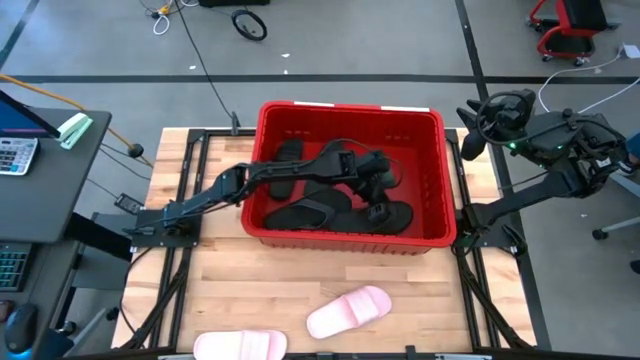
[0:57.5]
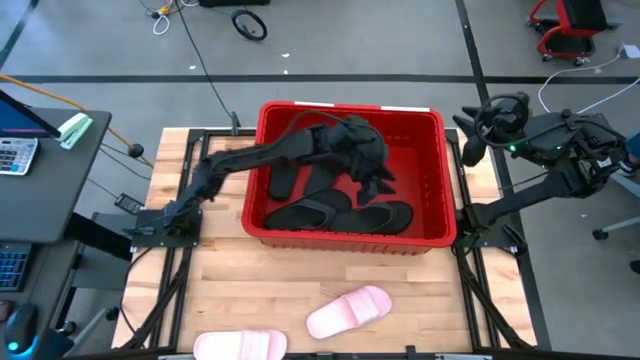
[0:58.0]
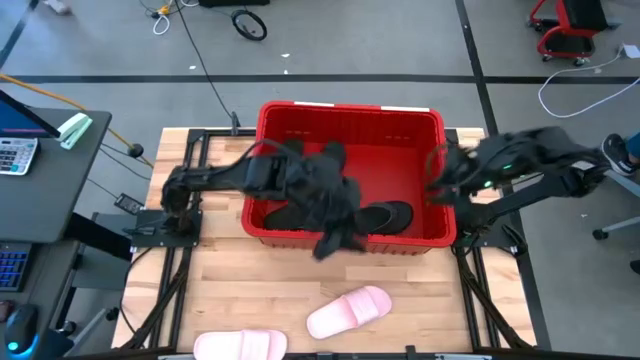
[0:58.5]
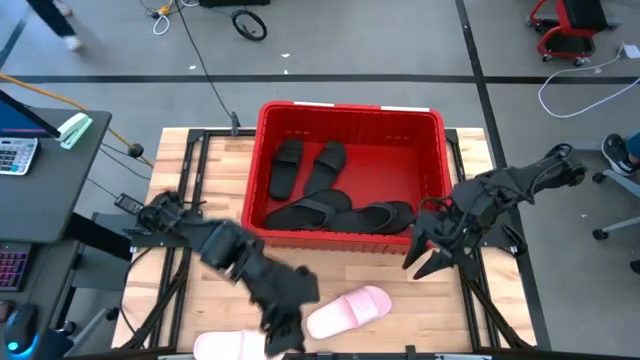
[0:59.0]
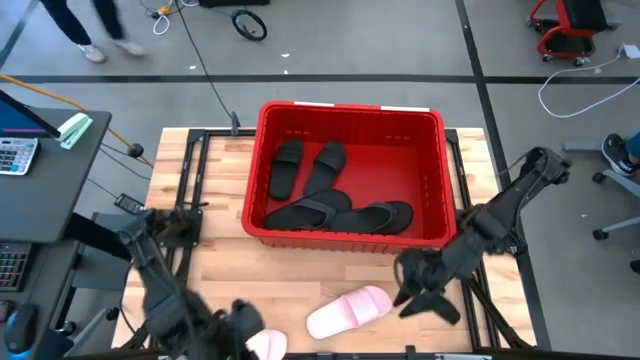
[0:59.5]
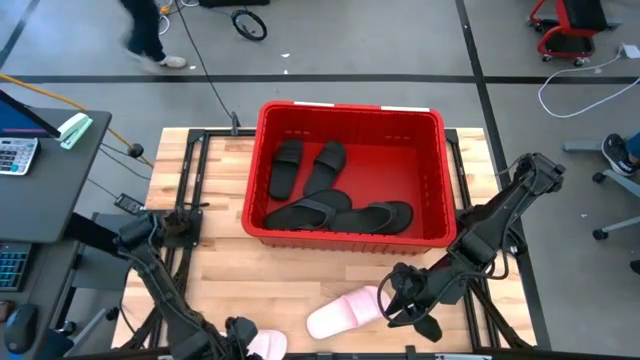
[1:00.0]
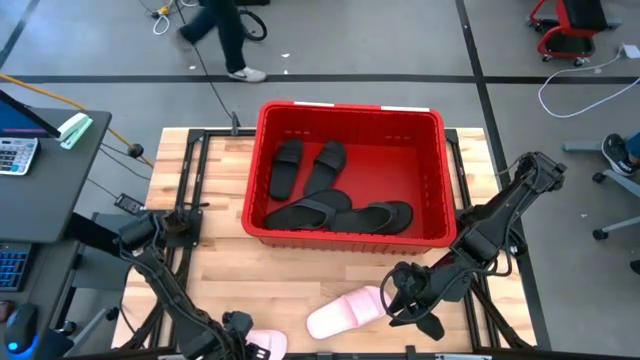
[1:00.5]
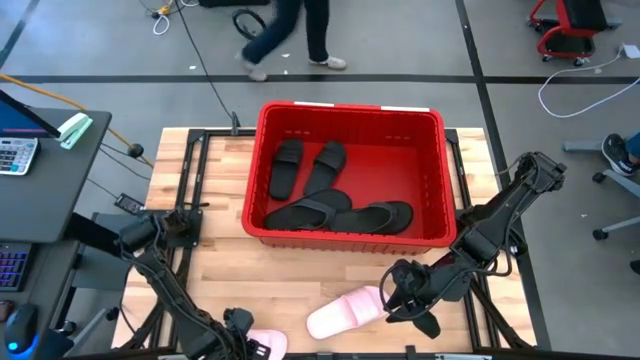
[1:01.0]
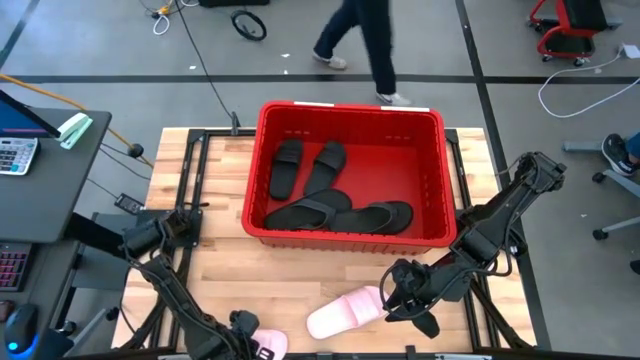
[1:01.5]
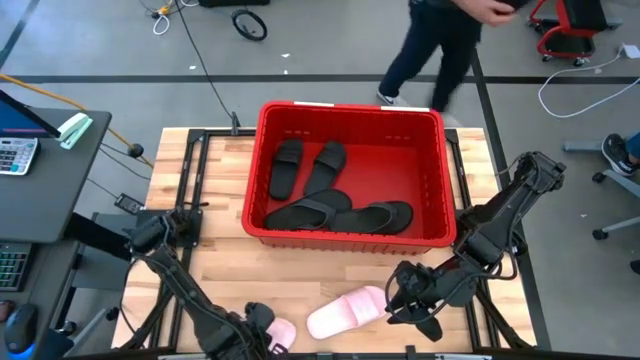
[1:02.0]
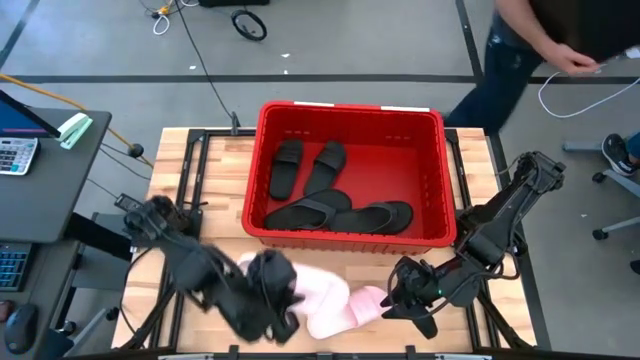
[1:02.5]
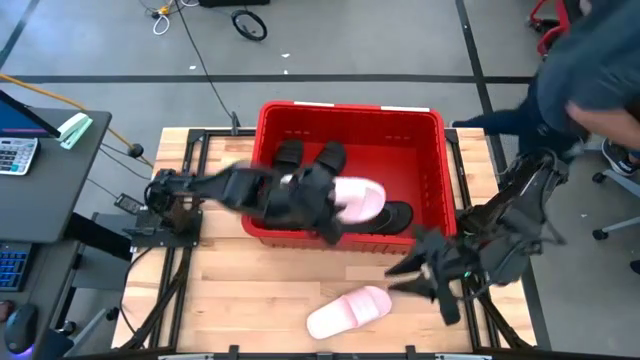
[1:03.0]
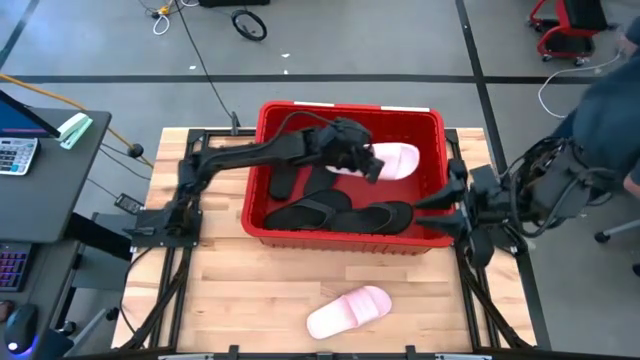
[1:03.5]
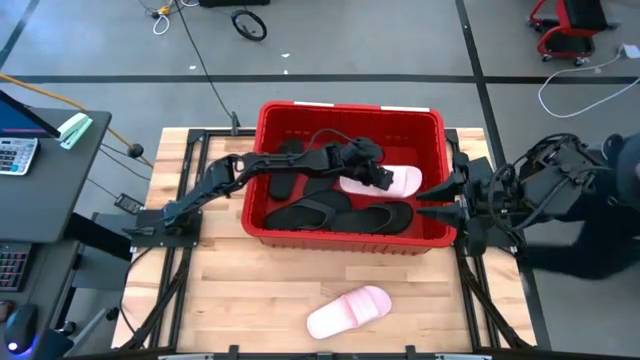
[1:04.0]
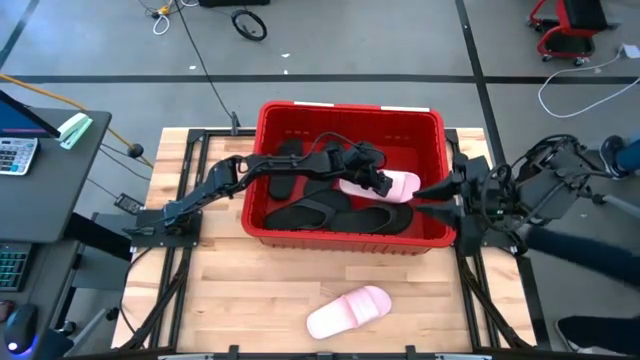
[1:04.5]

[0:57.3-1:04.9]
Task: Pick and place slides into bin
Put the left pink slide into the red bin

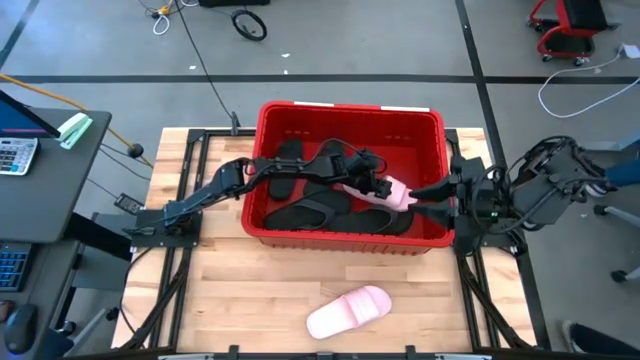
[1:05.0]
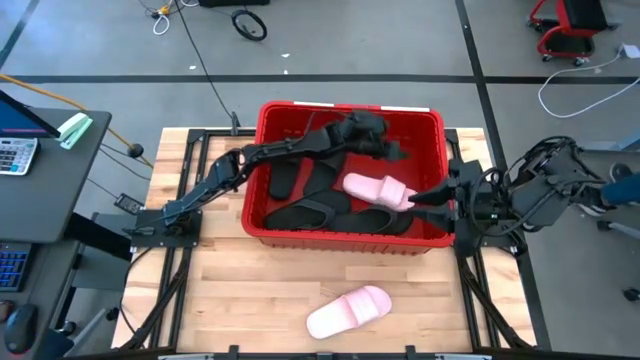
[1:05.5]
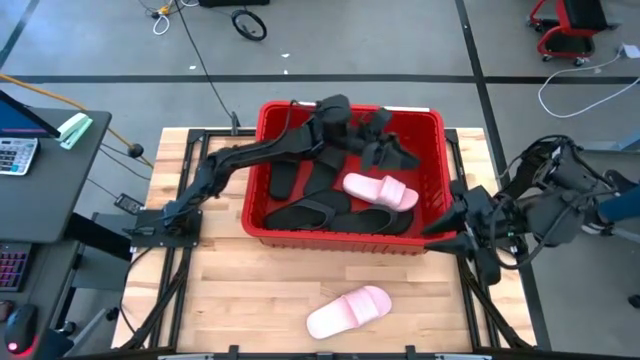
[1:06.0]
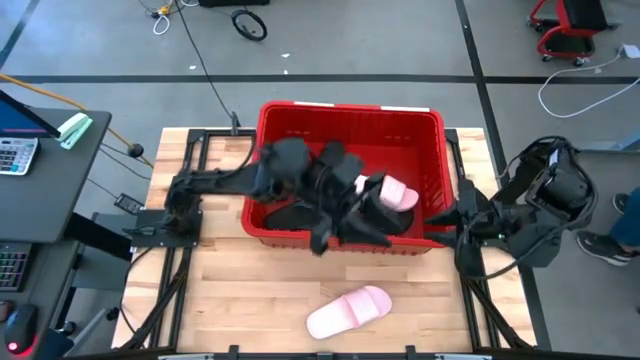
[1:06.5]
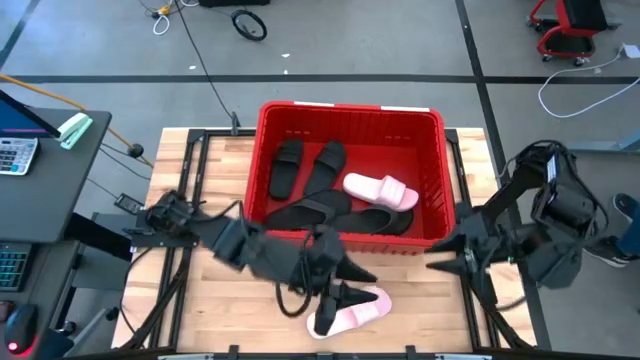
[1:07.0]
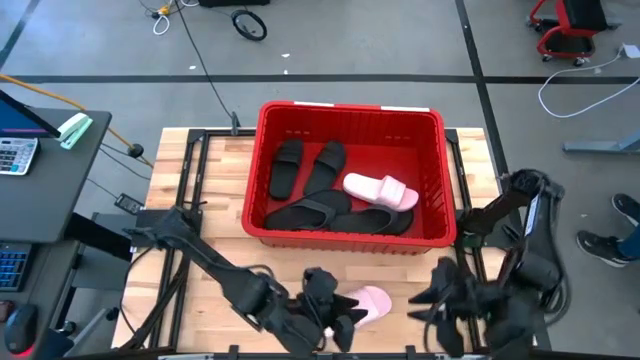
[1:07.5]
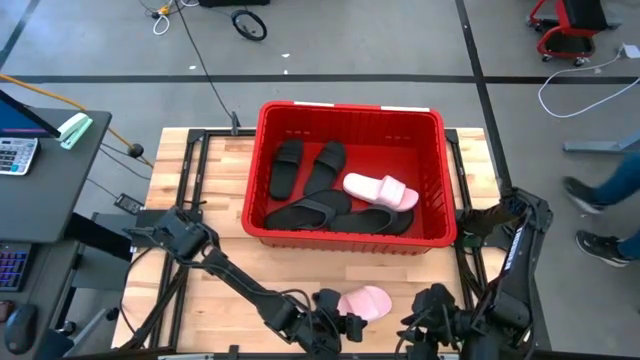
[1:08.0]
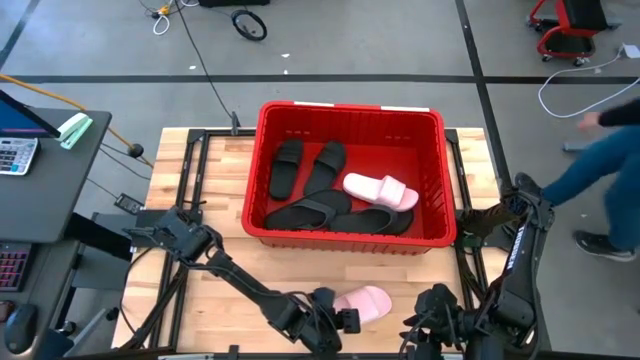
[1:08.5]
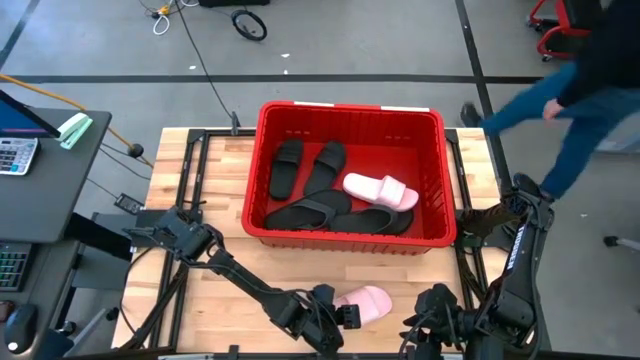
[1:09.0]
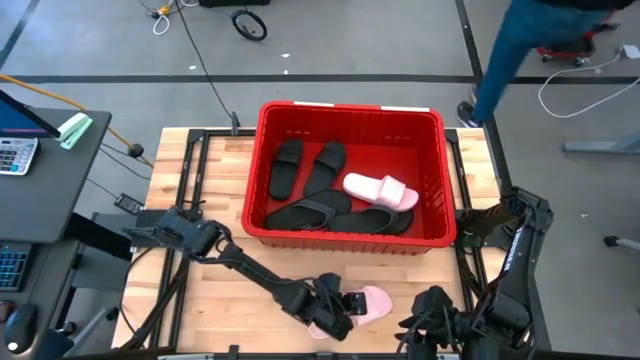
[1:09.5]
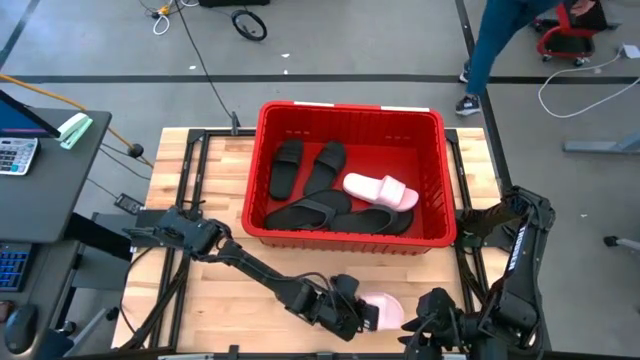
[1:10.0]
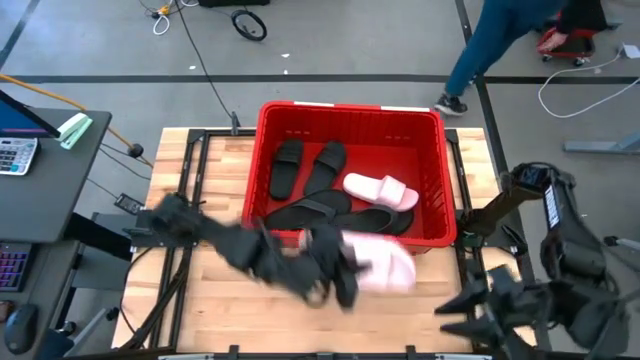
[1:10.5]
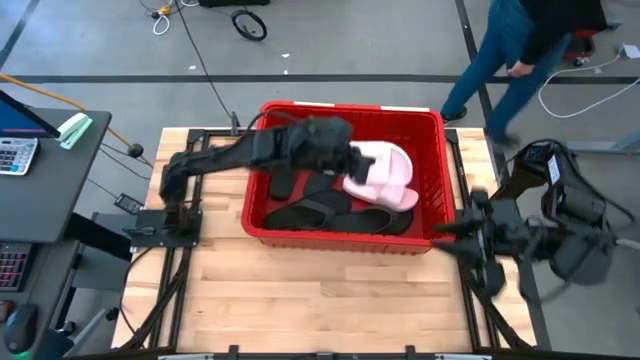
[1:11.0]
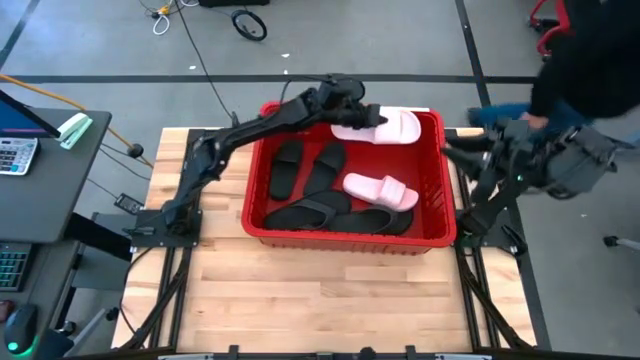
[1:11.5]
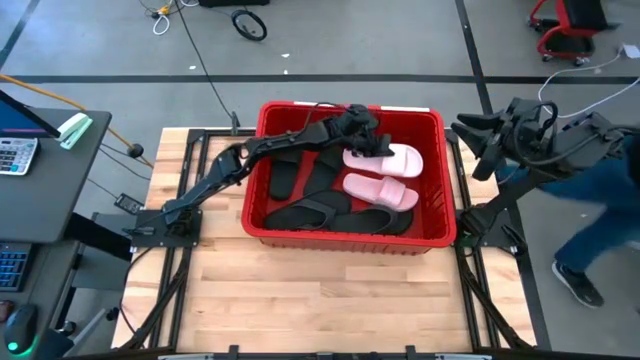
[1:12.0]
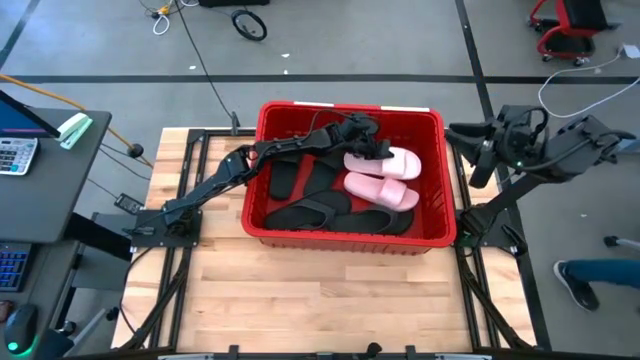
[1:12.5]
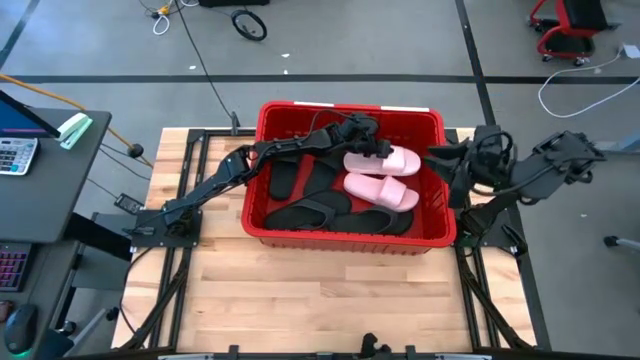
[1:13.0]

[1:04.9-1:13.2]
Put the pink slide into the red bin

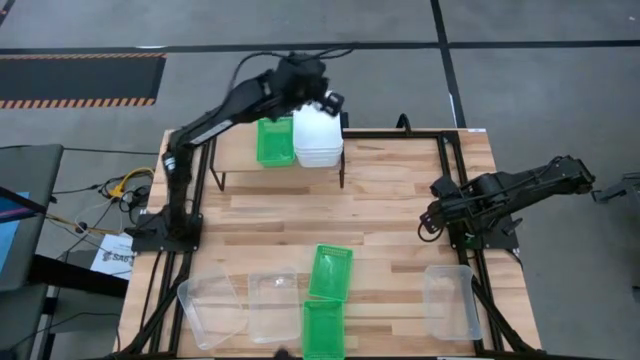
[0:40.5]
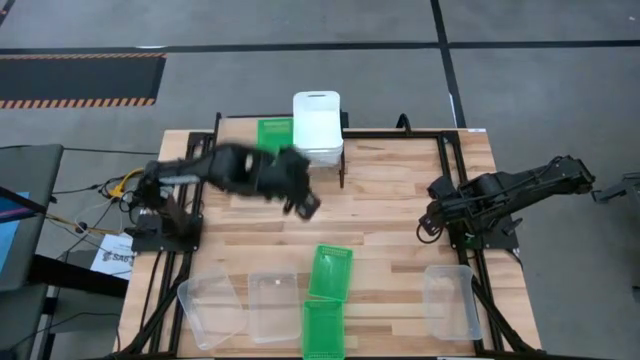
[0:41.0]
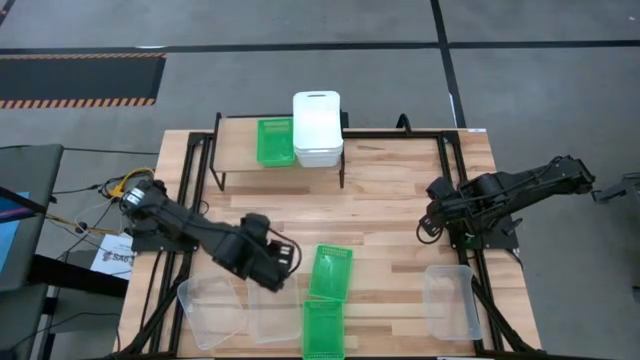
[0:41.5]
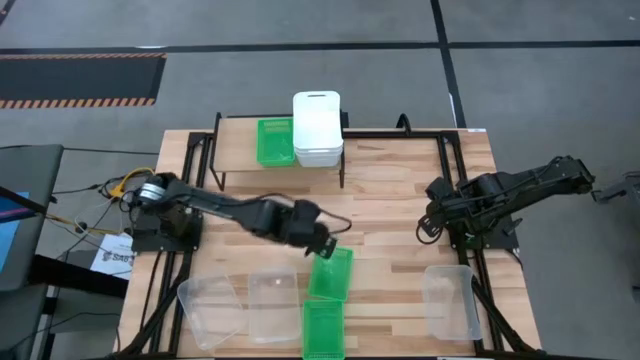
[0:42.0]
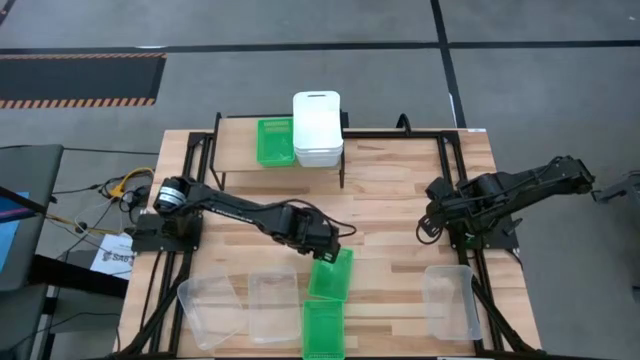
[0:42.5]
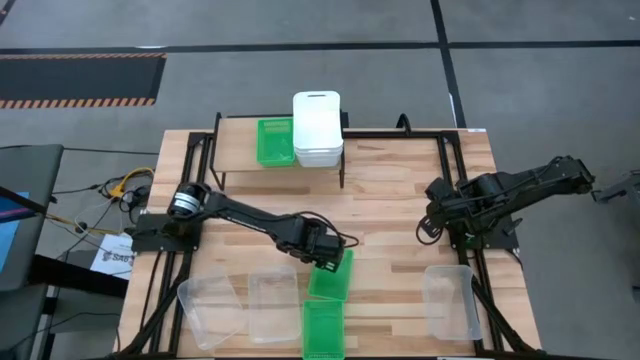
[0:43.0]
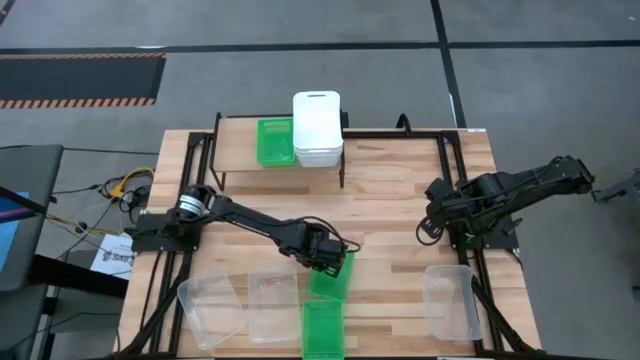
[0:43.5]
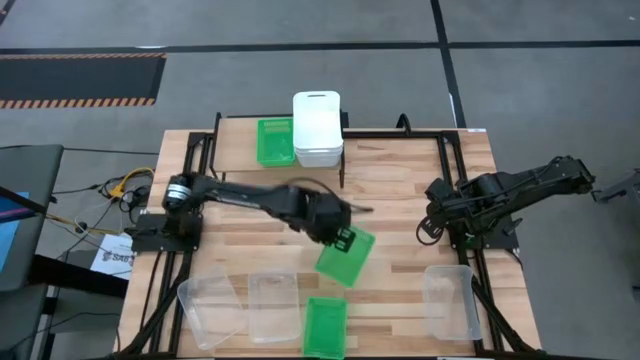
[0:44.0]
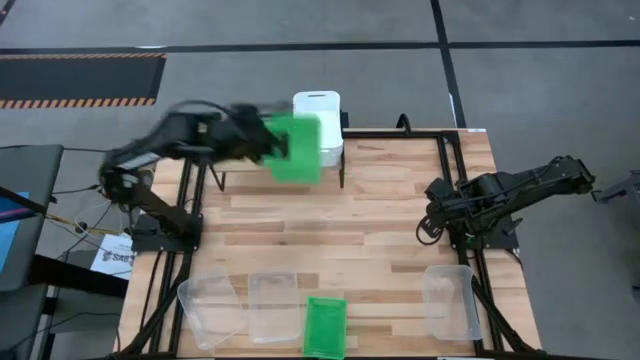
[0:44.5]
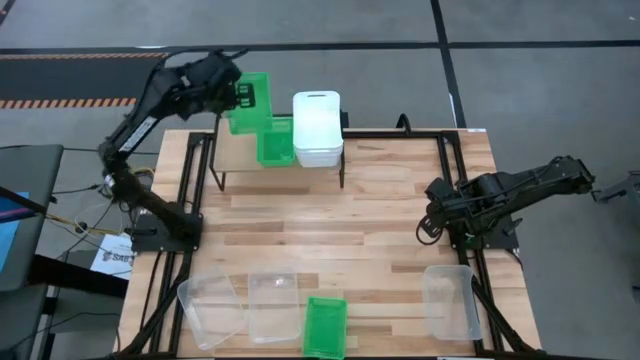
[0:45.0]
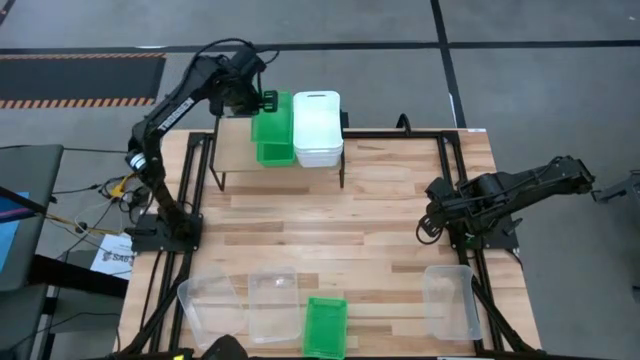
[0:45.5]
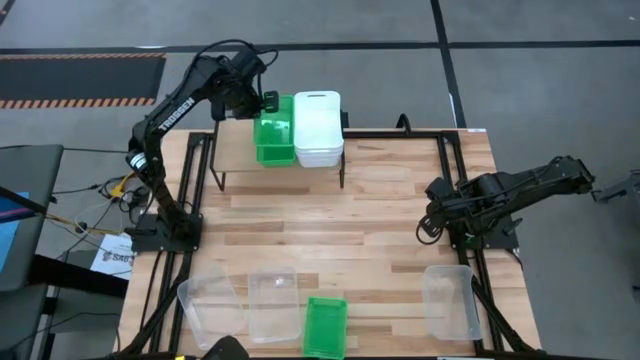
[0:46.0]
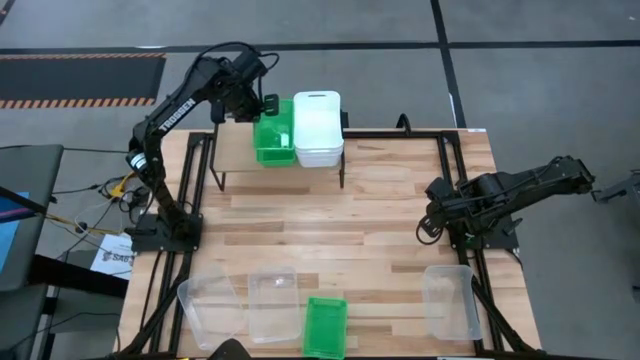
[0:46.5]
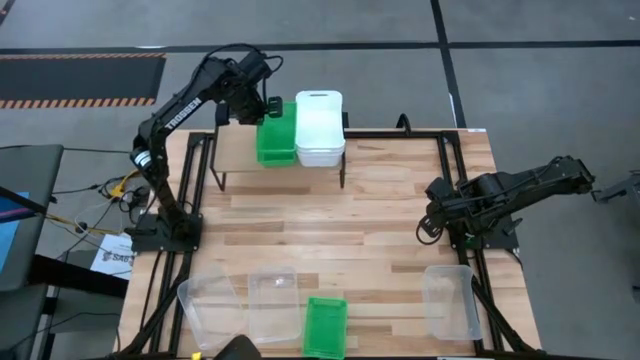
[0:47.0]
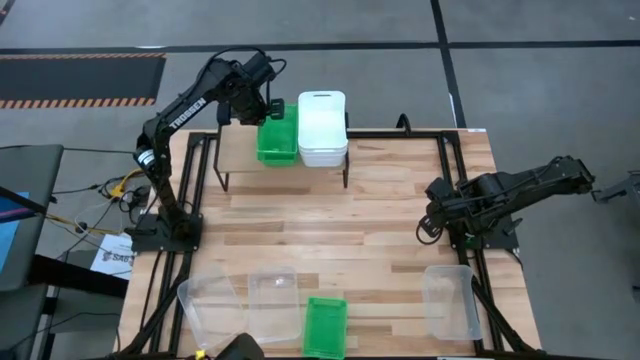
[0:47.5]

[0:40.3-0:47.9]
Task: Stack baskets on shelf by color
Stack the top green bin on top of the green bin on the shelf
